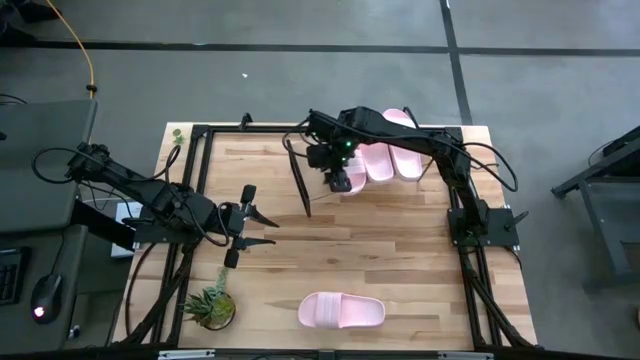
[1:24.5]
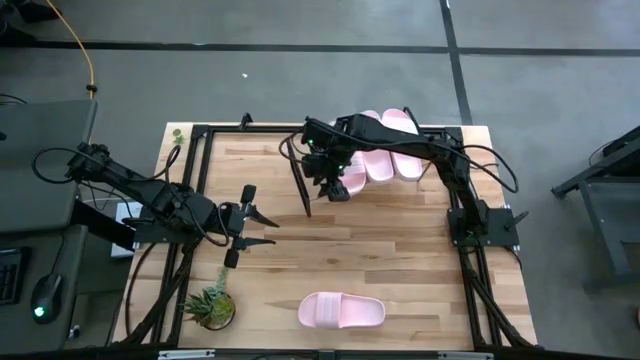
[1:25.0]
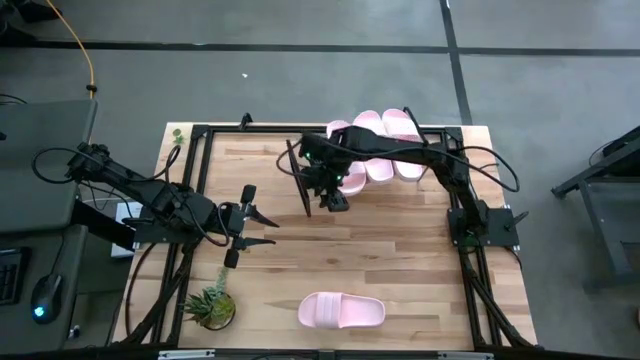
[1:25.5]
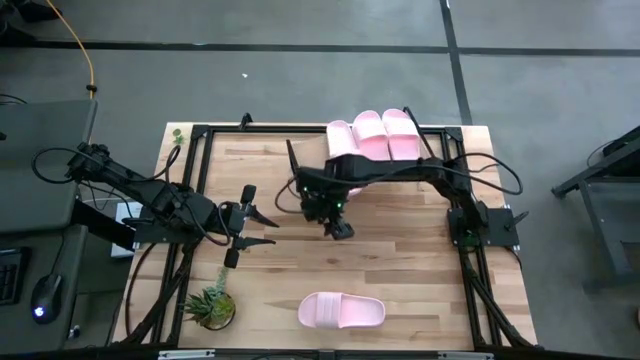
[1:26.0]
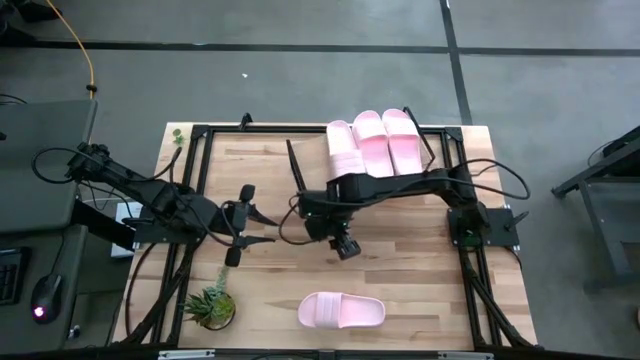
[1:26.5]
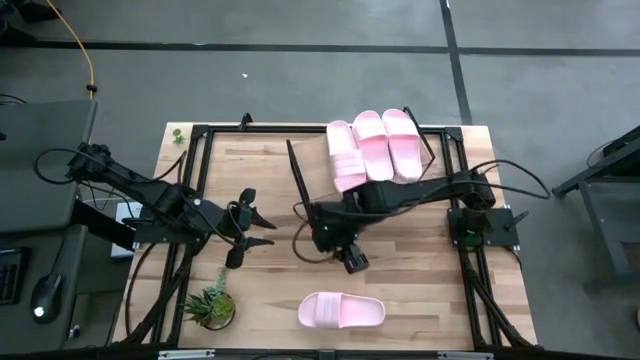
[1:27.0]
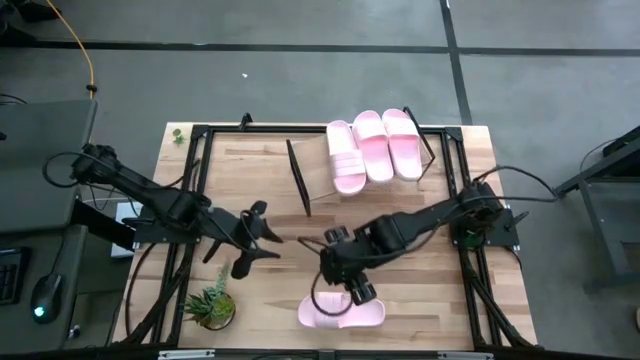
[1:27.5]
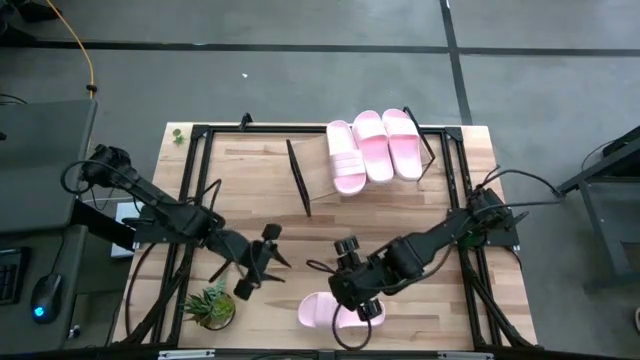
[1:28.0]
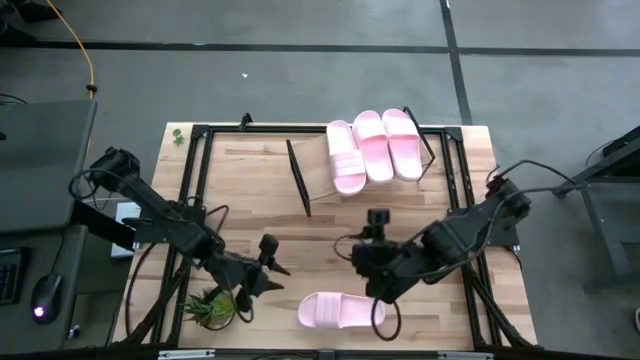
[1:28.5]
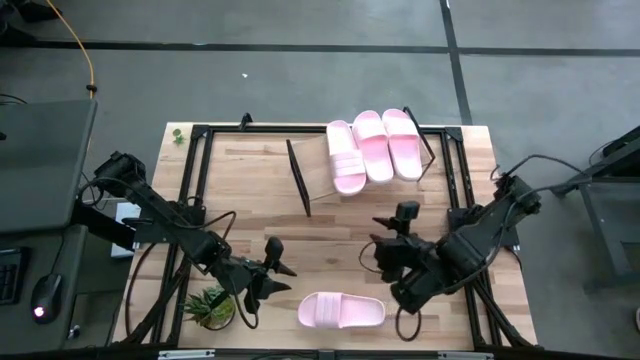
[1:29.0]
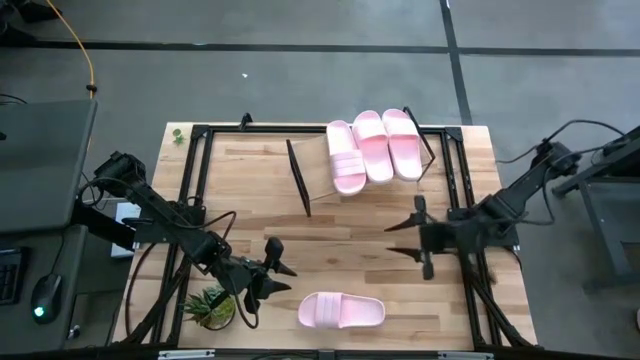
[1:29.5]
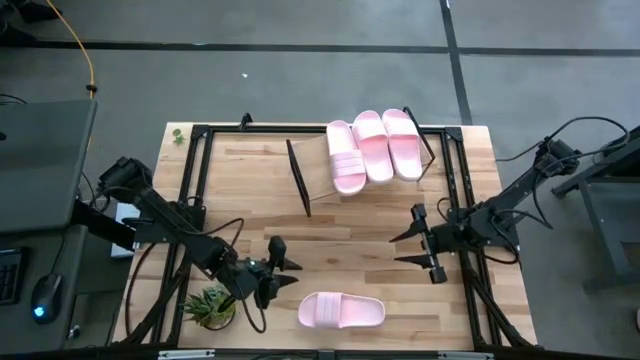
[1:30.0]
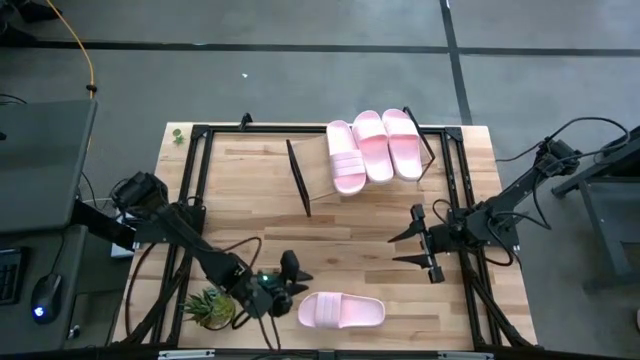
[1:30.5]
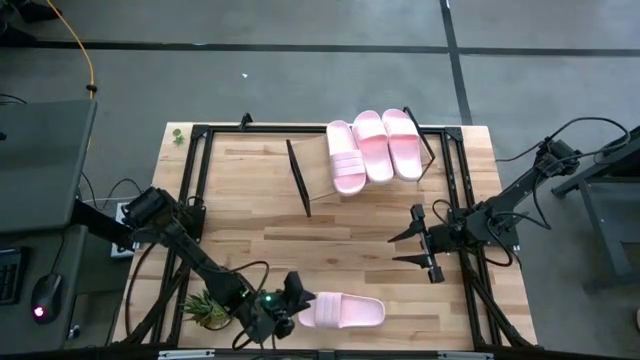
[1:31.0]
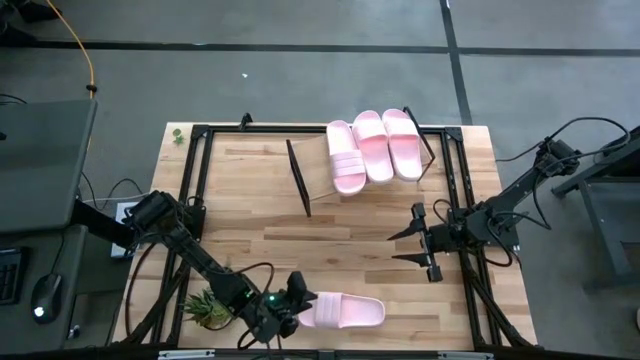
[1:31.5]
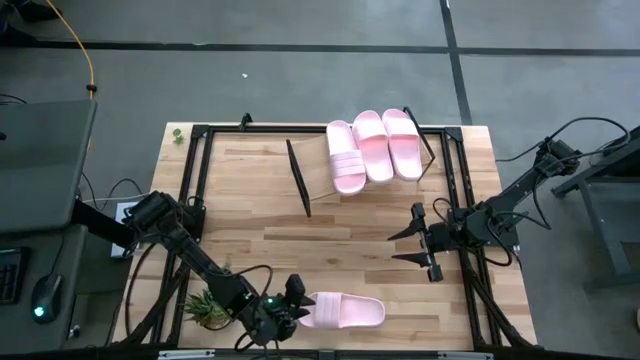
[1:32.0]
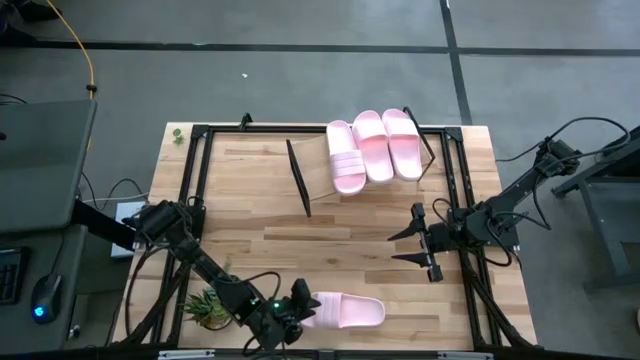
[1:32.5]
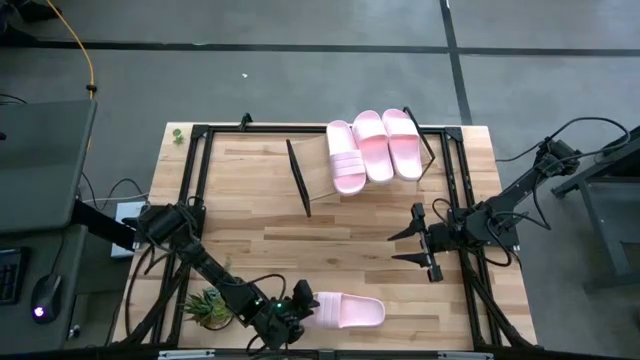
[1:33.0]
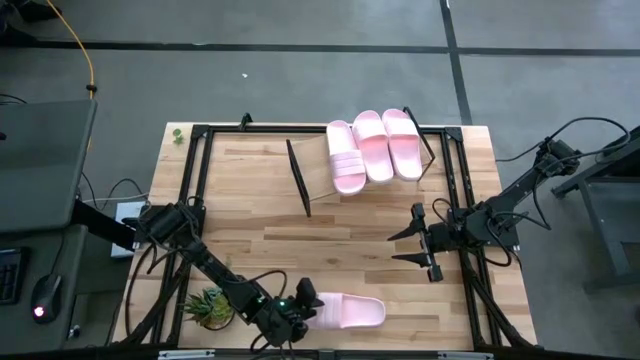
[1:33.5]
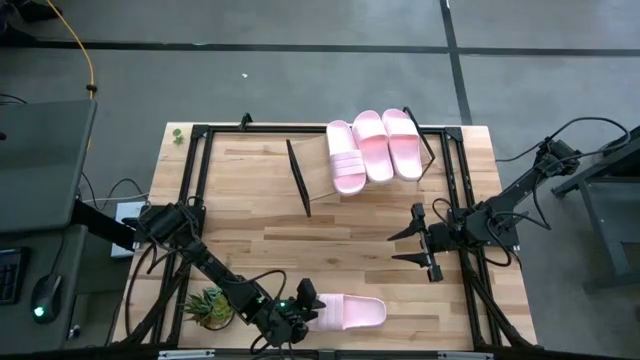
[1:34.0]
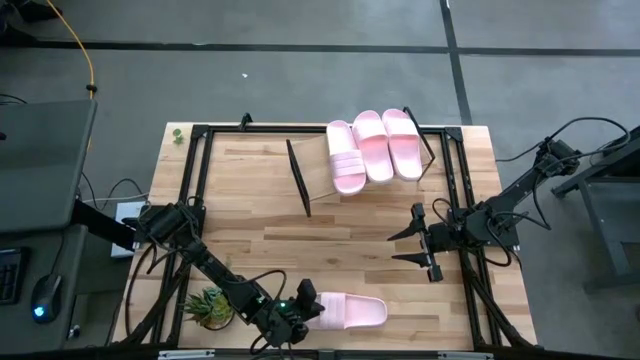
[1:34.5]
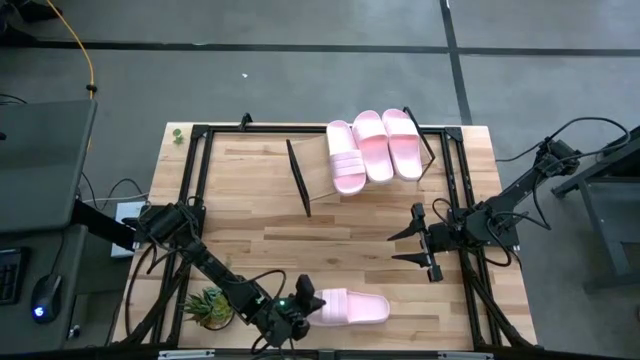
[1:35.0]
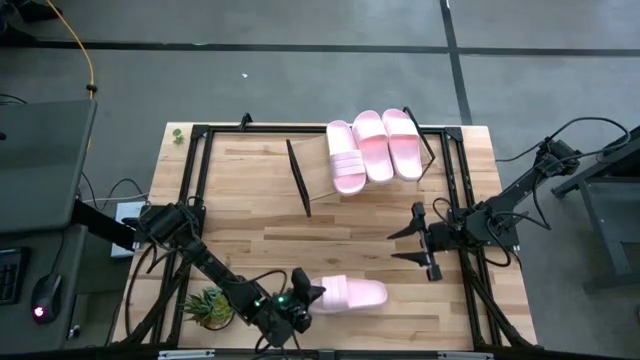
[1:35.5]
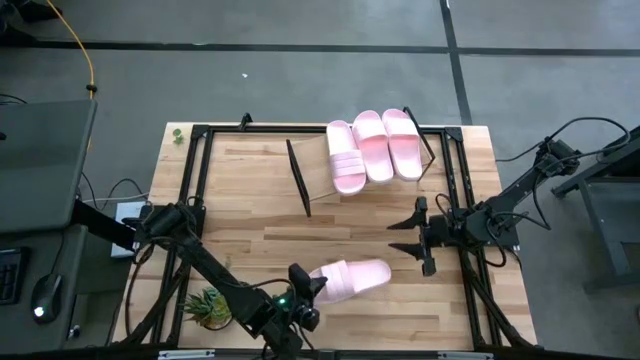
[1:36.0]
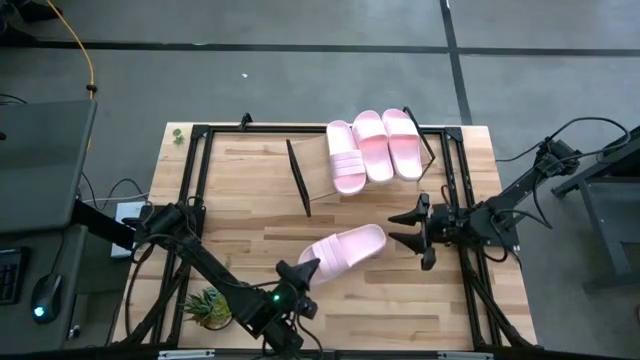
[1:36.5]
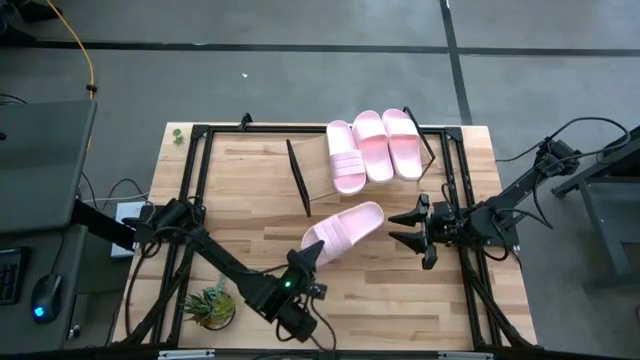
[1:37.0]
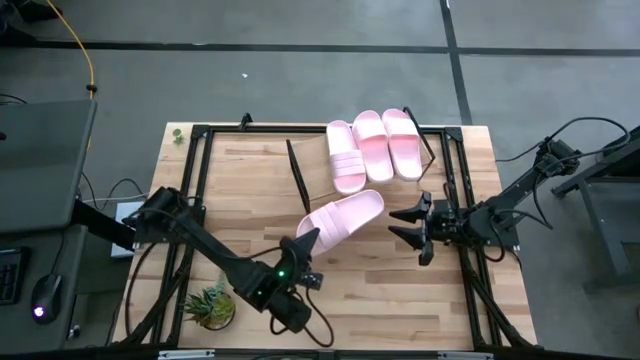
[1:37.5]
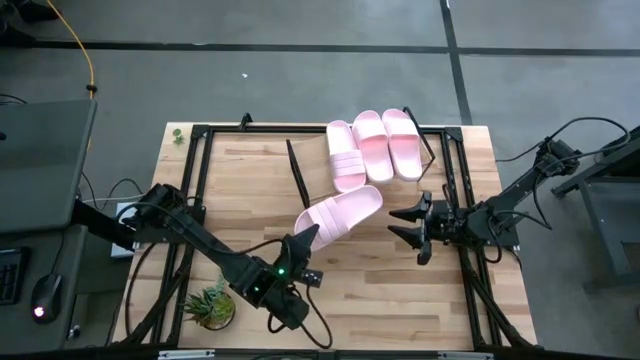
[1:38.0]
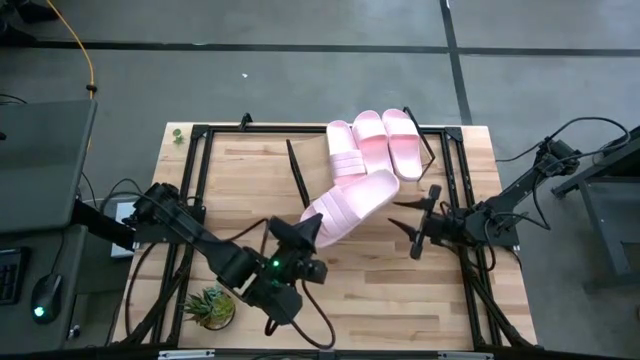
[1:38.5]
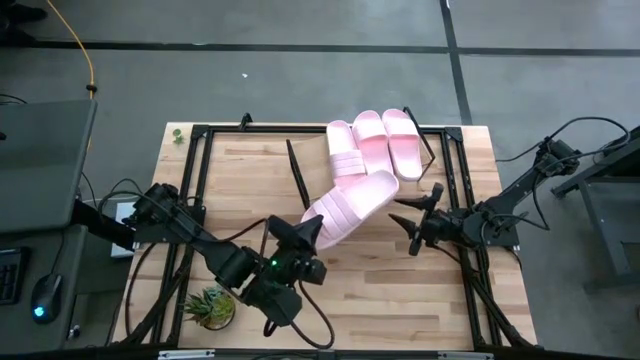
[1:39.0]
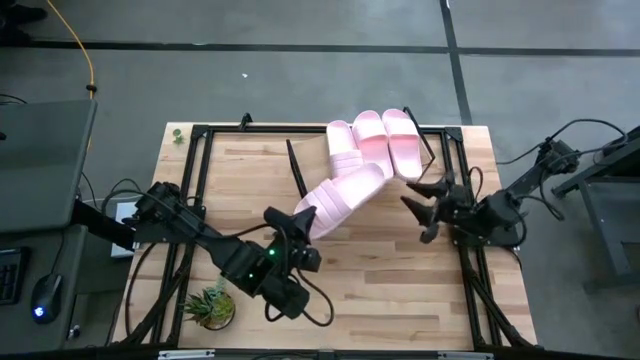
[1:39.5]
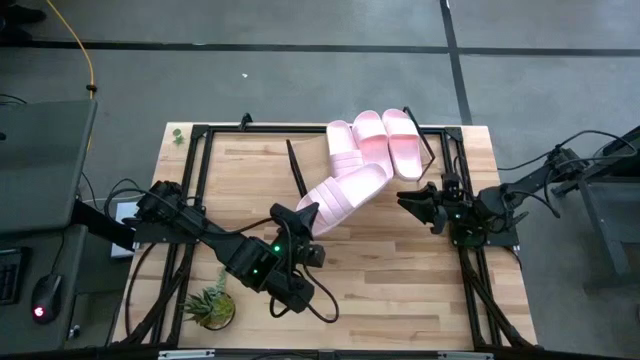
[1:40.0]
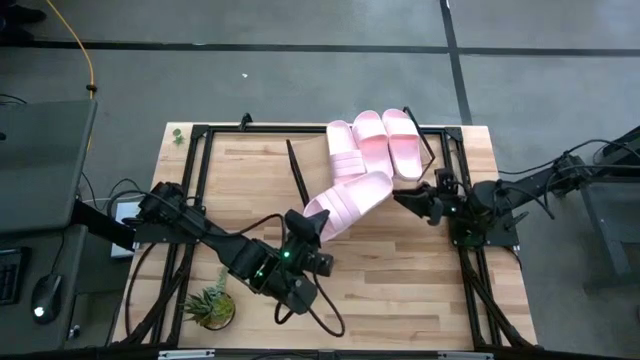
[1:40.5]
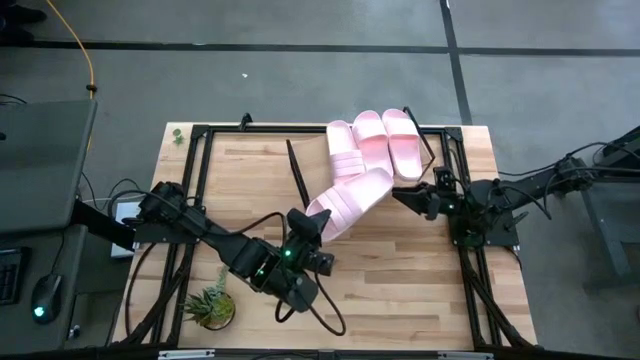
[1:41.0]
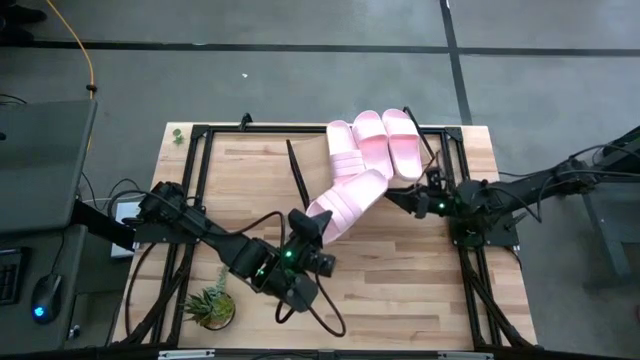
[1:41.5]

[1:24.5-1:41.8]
Task: Pick and place slides into the shelf
Put the pink slide on the shelf

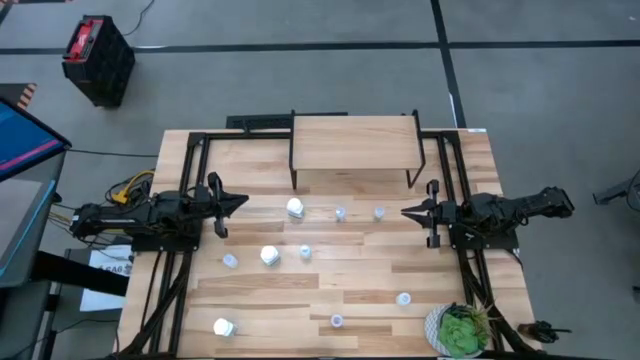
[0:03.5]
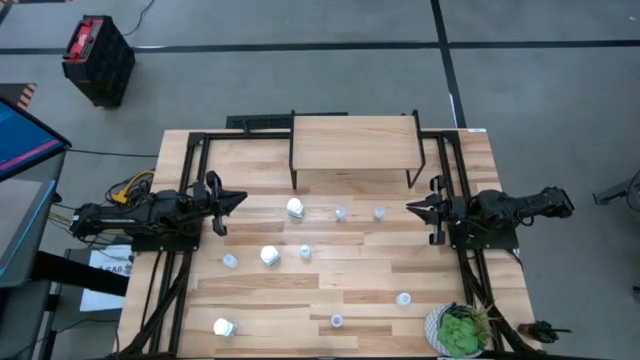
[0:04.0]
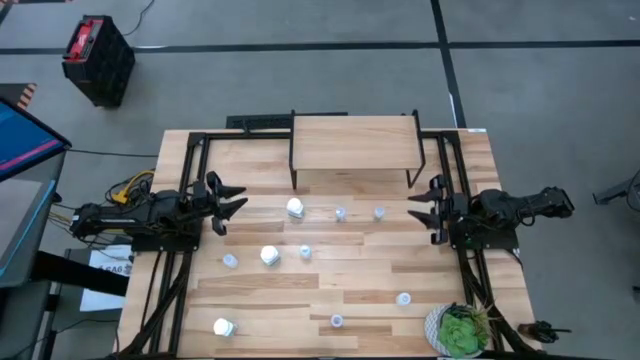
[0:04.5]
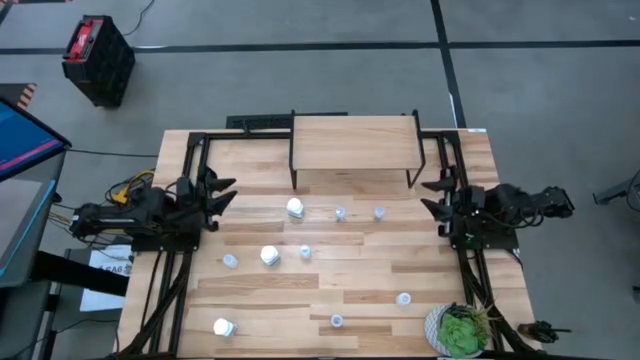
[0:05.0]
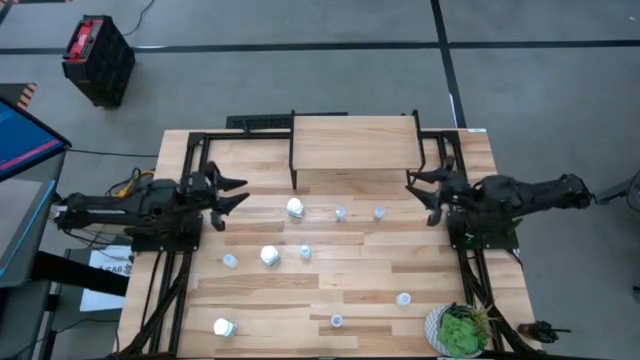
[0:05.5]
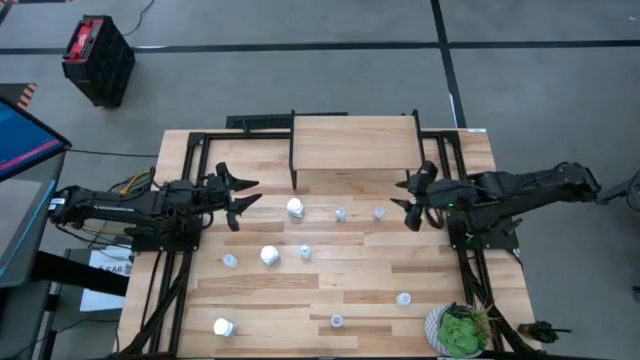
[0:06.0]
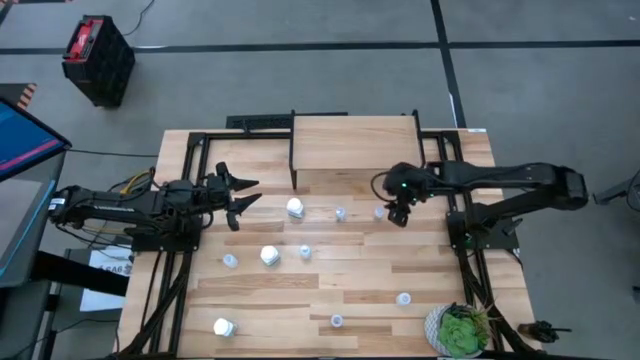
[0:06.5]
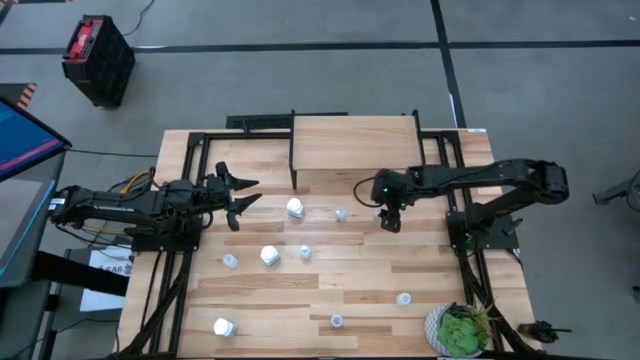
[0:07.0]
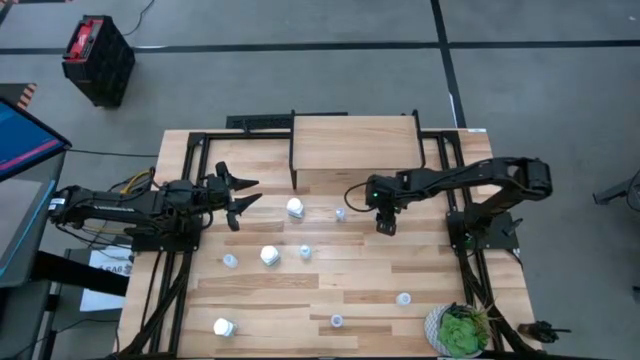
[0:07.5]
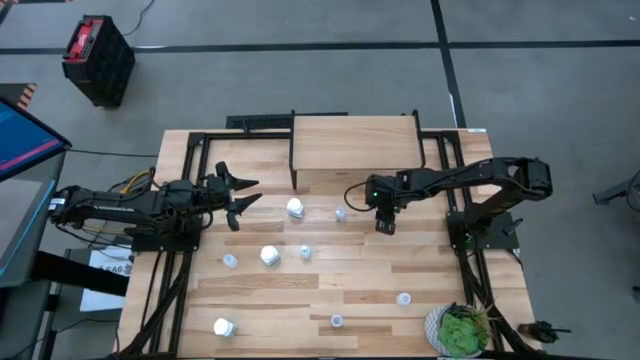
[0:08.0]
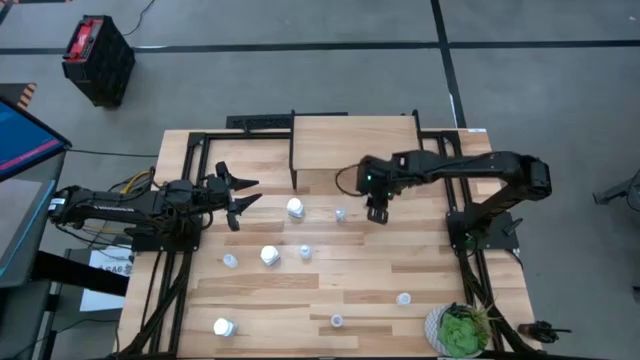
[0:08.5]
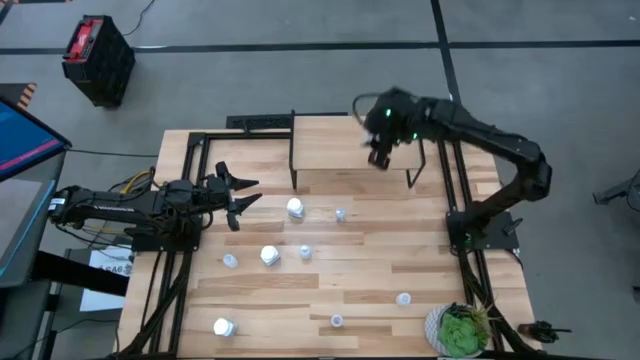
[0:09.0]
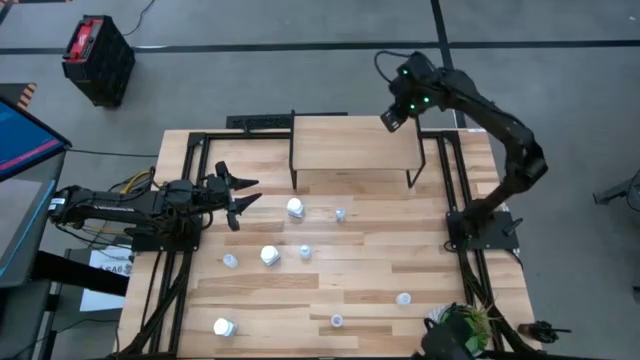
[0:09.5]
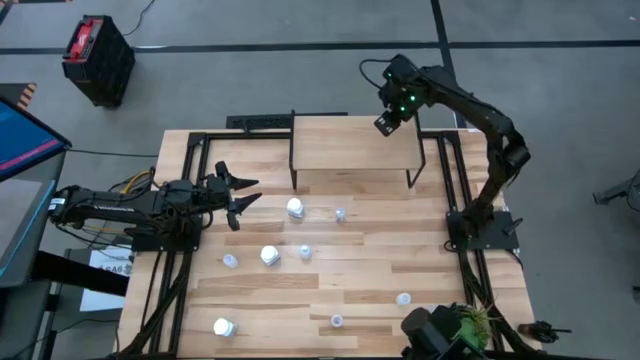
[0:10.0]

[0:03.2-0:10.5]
Task: Pick and place medicine bottles onto shelf by color
Put the top right transparent medicine bottle onto the right side of the shelf
